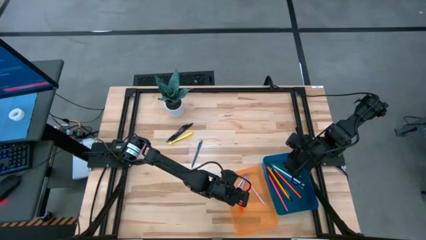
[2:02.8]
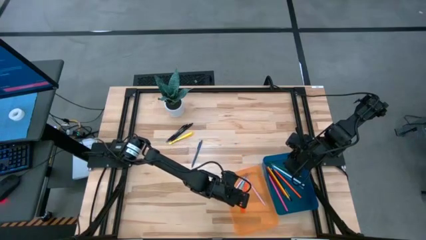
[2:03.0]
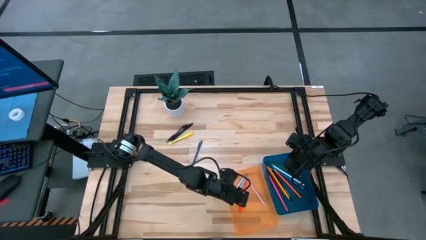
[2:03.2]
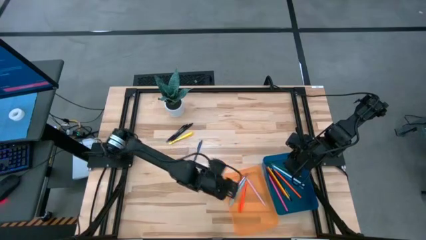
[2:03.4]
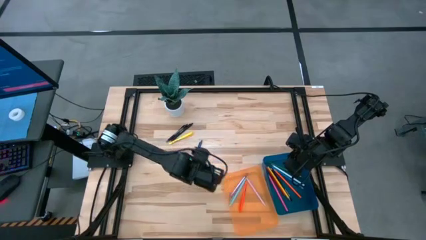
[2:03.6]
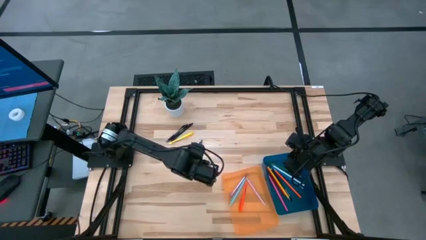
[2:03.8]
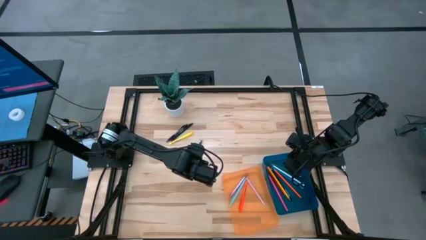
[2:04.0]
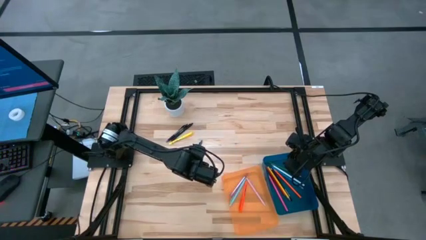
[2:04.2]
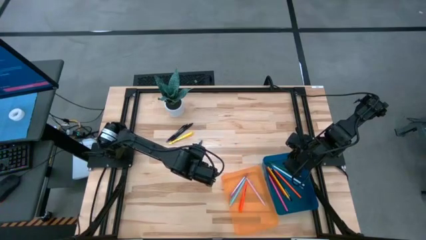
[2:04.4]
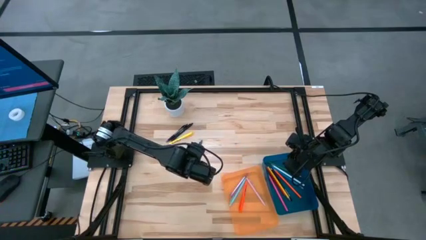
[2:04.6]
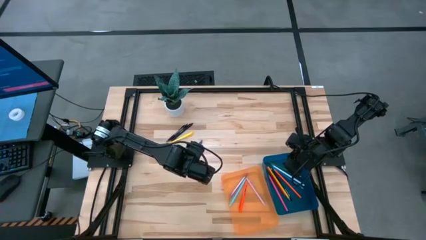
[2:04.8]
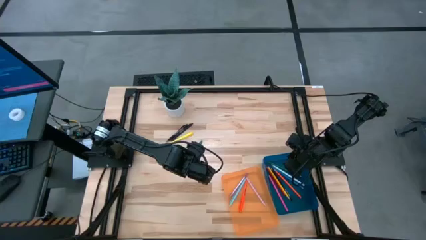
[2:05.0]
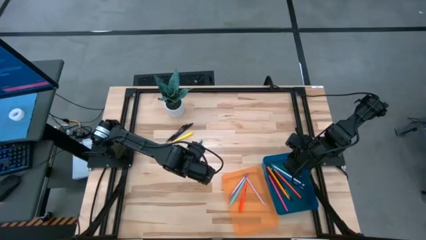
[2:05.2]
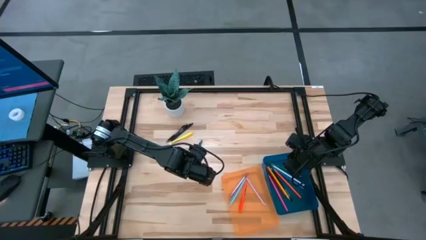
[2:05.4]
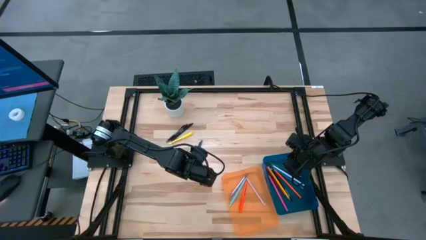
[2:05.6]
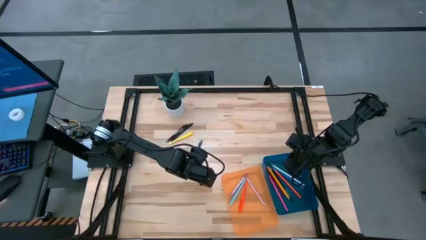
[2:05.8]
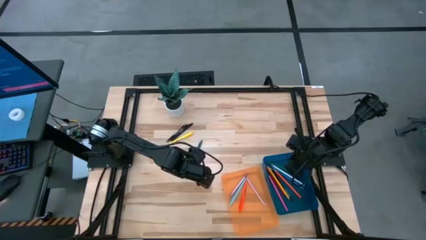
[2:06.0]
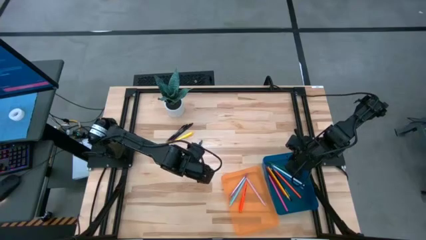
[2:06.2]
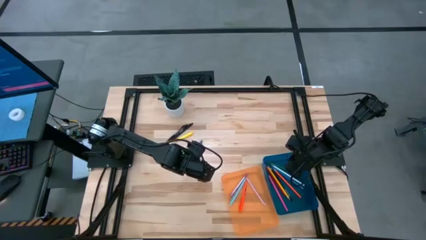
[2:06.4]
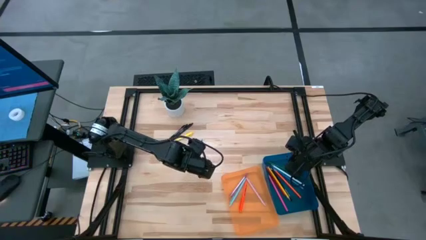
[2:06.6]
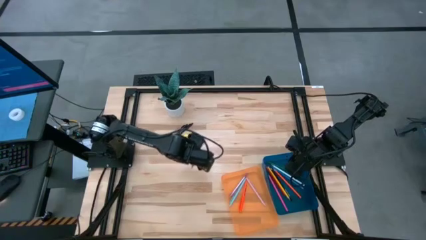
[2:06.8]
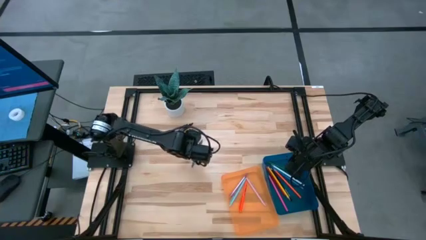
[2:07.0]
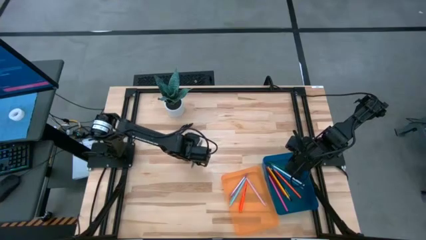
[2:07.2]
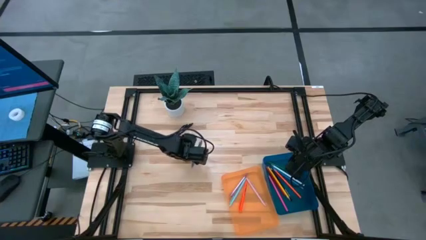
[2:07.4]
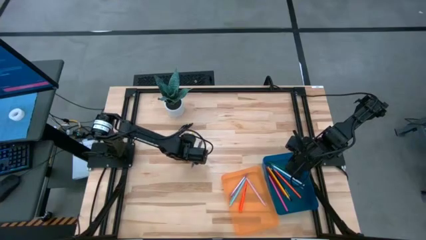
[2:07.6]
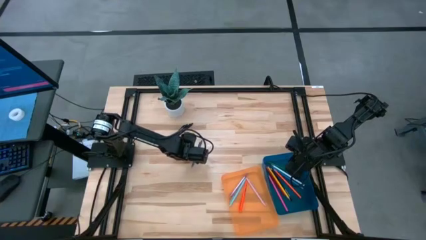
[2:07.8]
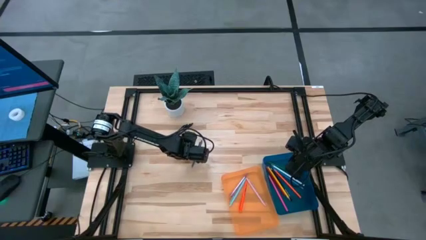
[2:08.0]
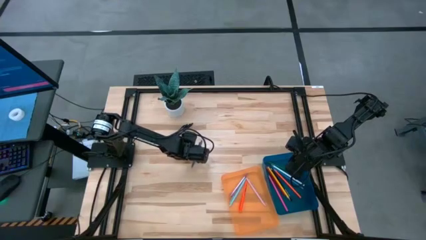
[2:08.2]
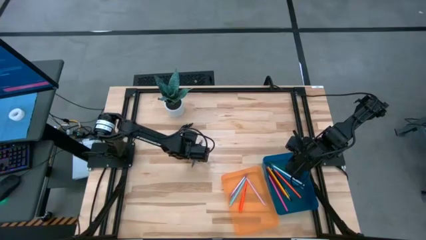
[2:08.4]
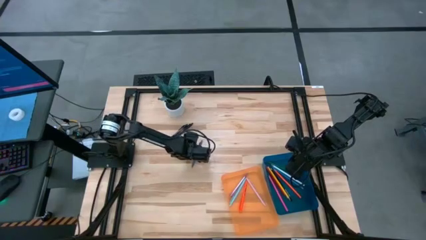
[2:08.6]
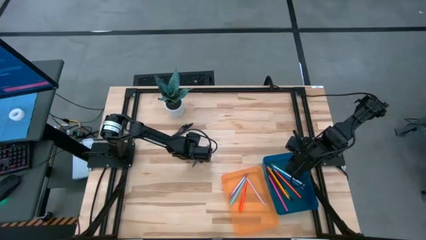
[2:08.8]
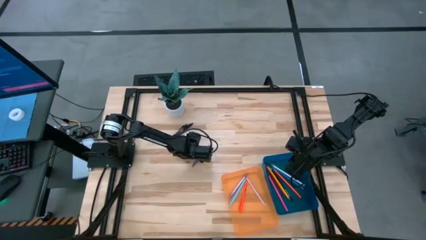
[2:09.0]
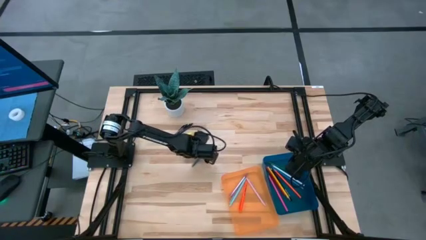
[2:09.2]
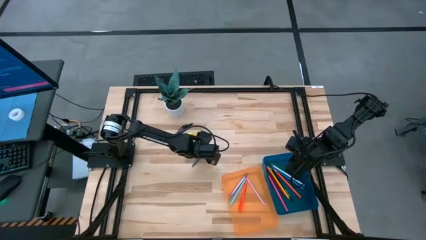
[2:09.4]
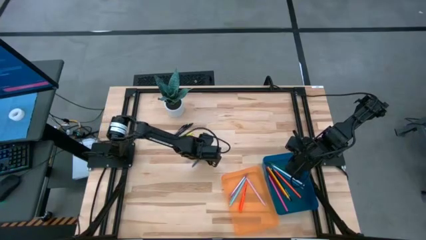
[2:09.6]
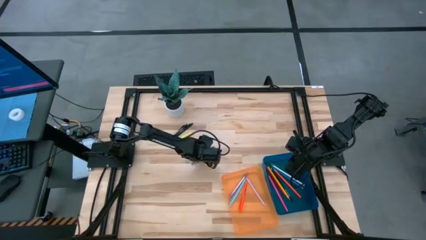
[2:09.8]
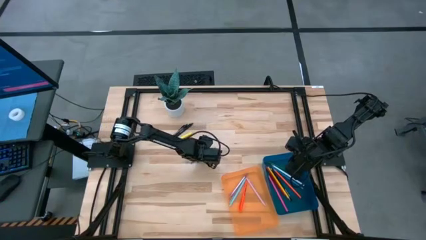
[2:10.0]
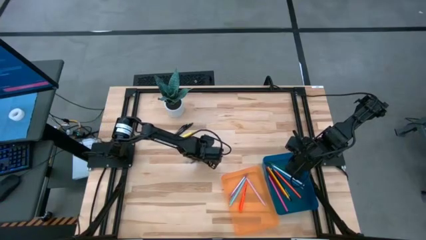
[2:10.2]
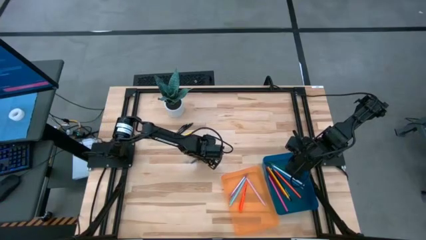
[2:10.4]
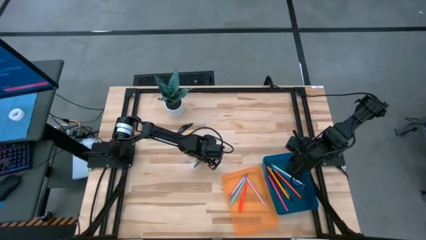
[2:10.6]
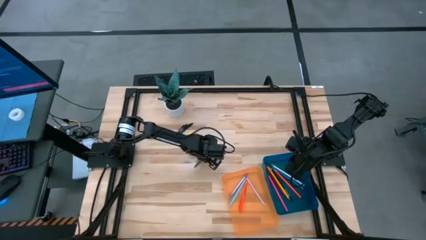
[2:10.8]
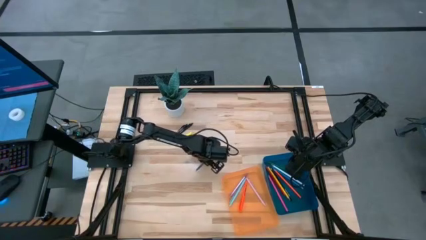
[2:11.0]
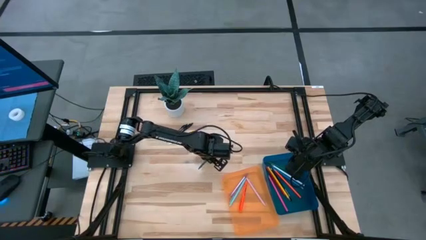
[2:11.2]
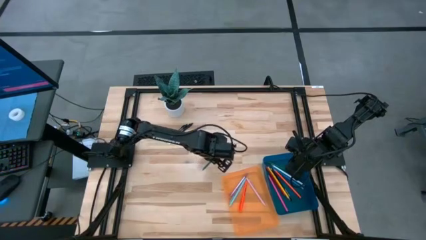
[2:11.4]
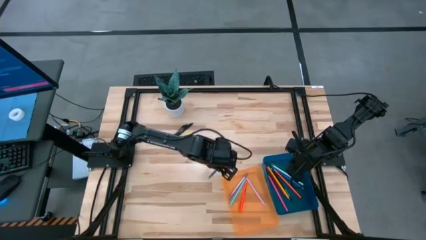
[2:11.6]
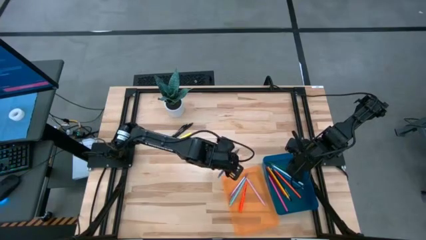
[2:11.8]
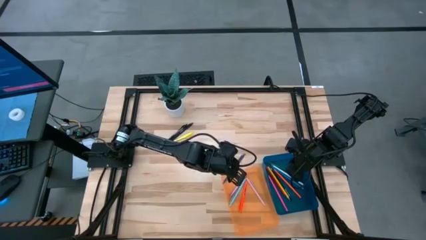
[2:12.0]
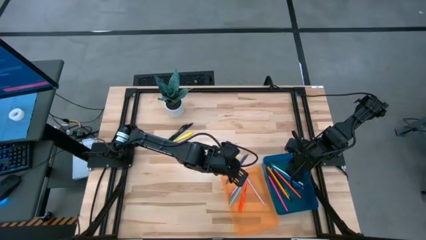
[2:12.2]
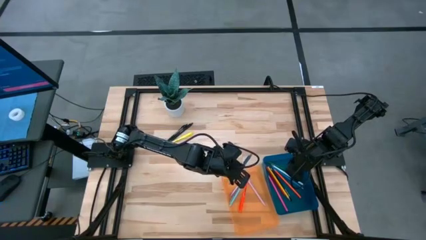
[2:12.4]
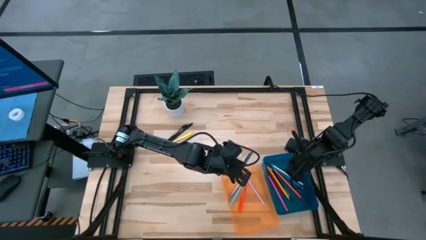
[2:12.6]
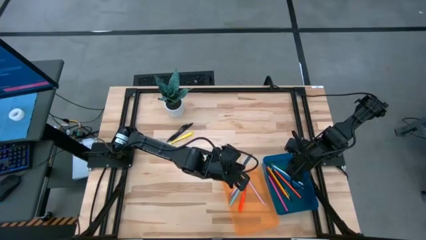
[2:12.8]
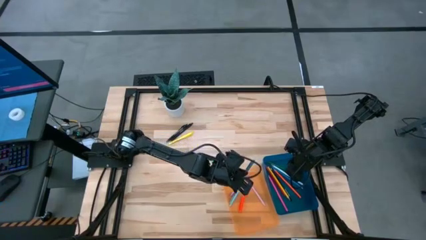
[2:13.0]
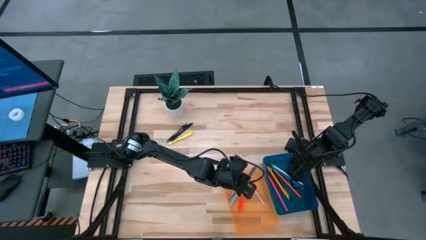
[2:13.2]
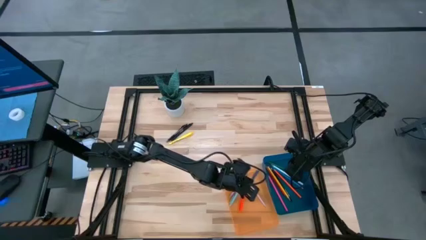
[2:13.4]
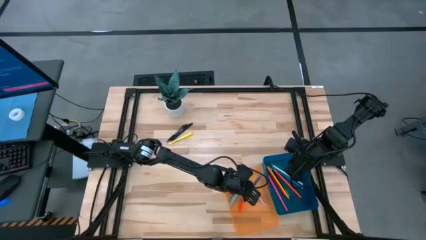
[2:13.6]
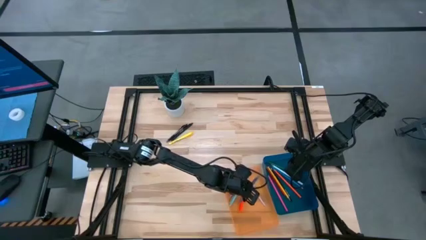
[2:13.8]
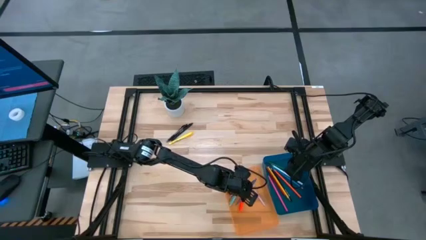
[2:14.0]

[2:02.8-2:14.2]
Task: Sort pens & pencils
Put the blue pen into the orange bin

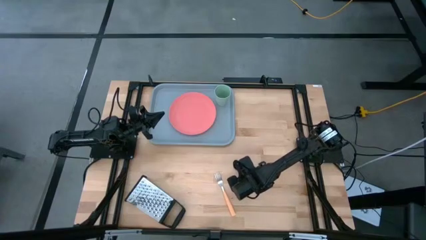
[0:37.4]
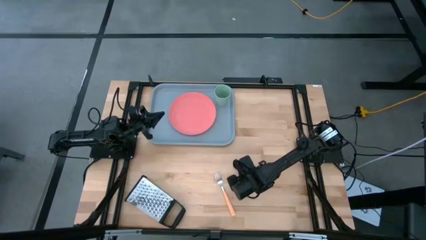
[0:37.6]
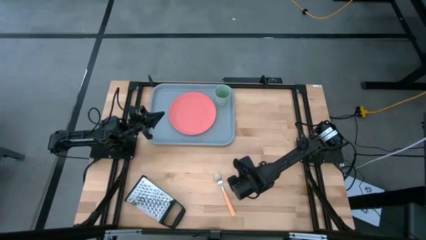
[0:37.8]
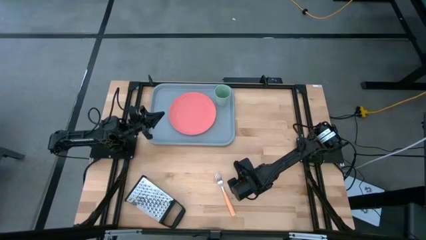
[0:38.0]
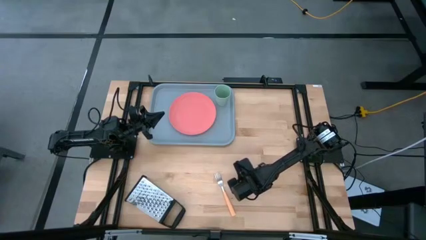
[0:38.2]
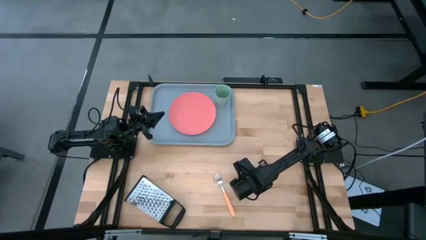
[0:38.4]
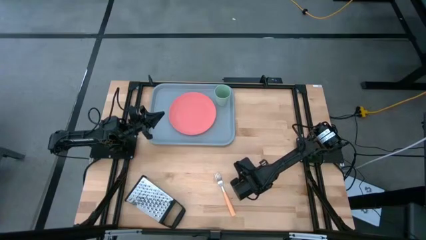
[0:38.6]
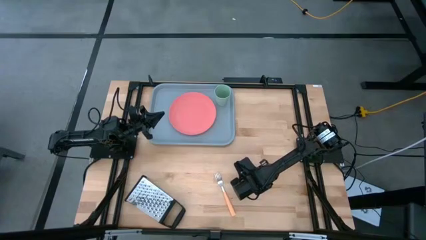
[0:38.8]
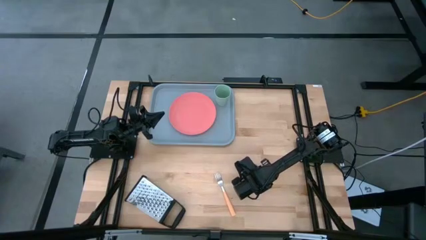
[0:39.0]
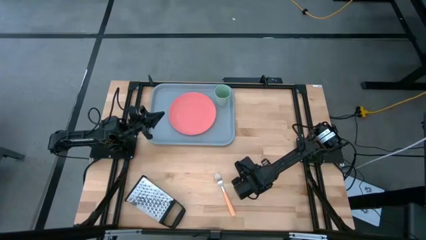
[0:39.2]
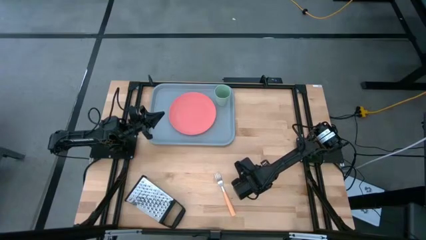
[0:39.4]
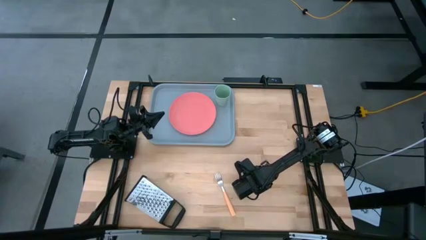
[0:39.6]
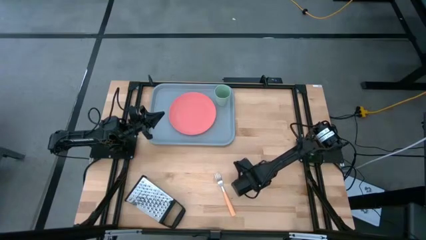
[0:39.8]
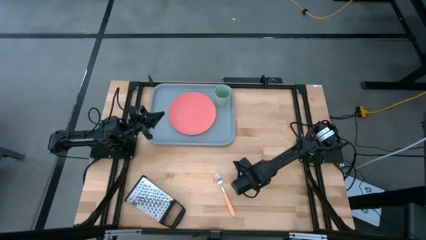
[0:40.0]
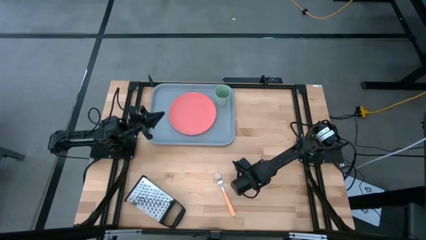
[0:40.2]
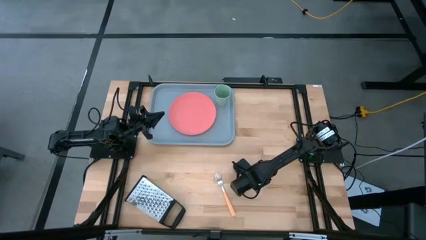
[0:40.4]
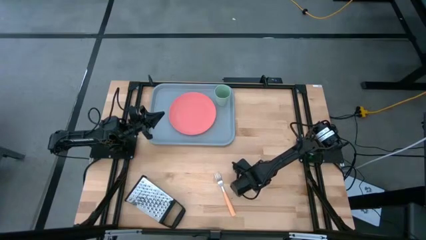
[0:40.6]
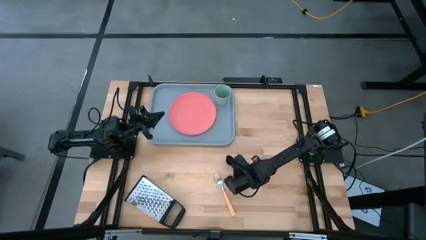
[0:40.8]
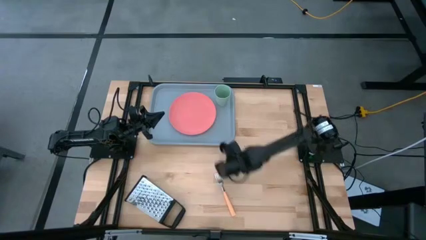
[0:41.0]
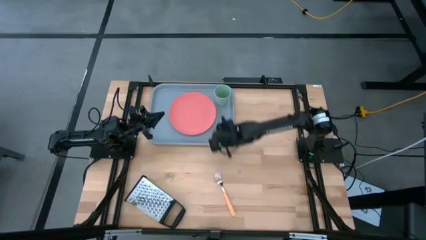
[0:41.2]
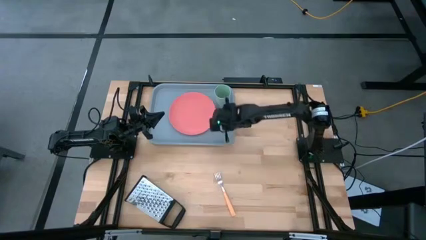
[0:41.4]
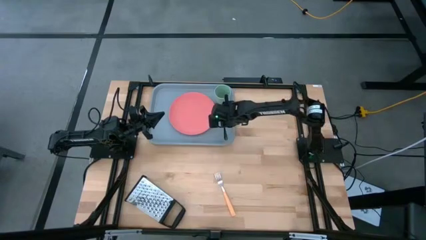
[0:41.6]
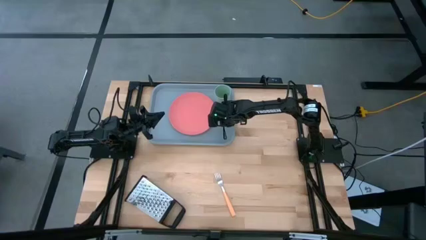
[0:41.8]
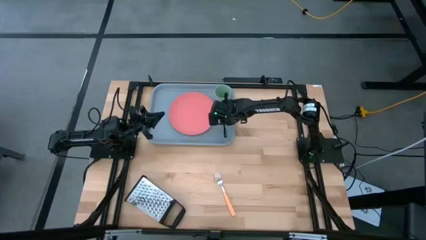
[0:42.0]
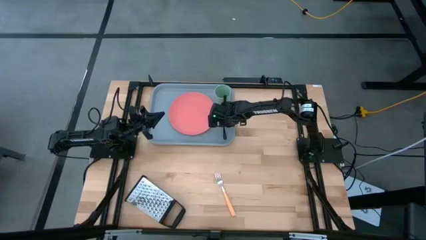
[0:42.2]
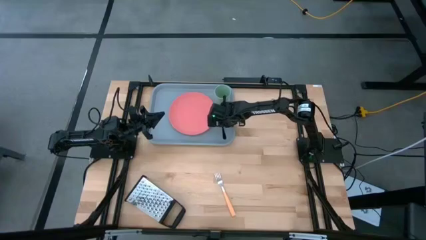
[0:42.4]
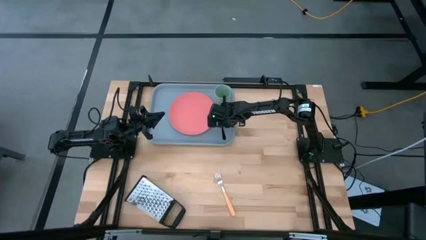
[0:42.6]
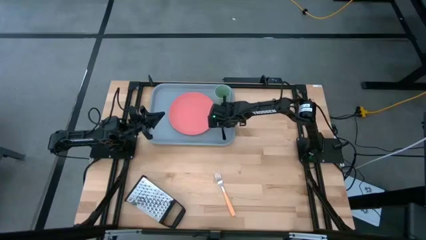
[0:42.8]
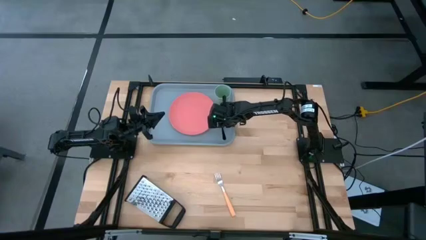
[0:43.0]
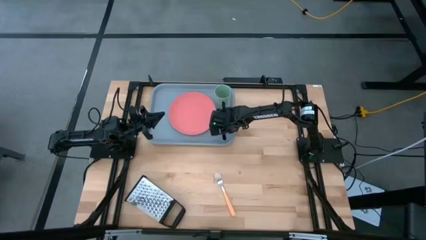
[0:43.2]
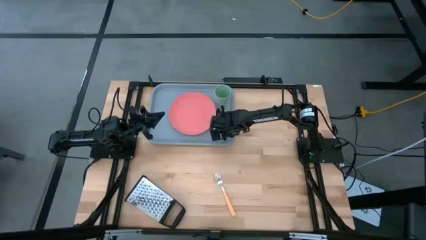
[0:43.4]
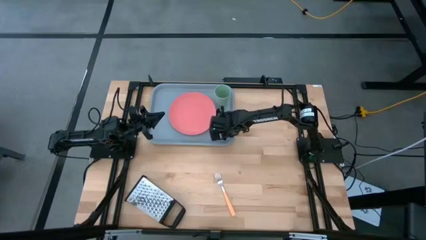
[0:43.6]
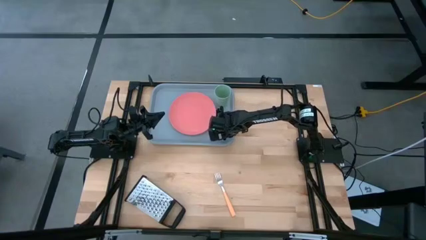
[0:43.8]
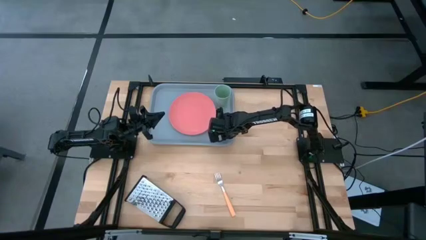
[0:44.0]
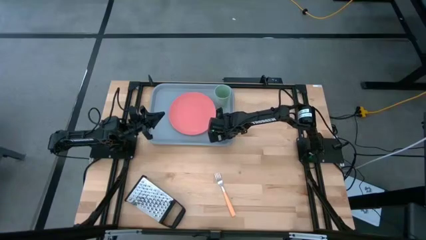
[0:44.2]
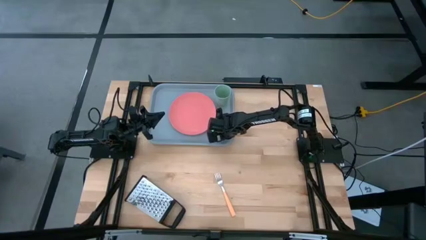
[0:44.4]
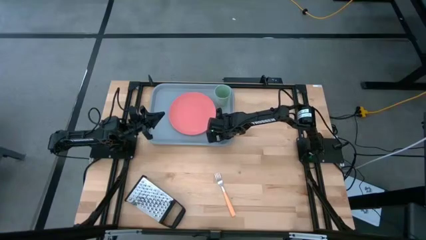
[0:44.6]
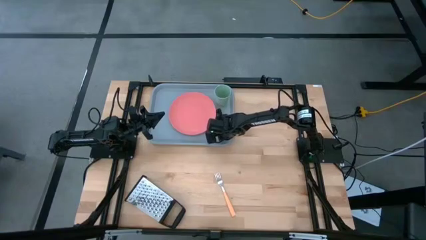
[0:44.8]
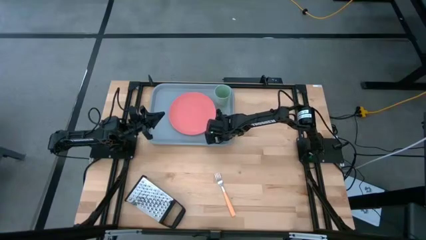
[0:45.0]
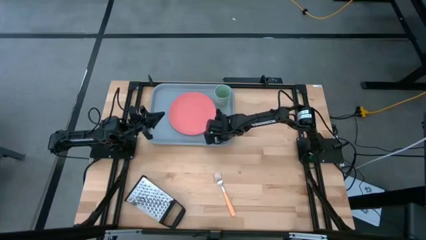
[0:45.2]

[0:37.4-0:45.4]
Task: Pick and place plate/cup/fork/spoon on tray
Put the black spoon on the gray serving tray beside the pink plate
